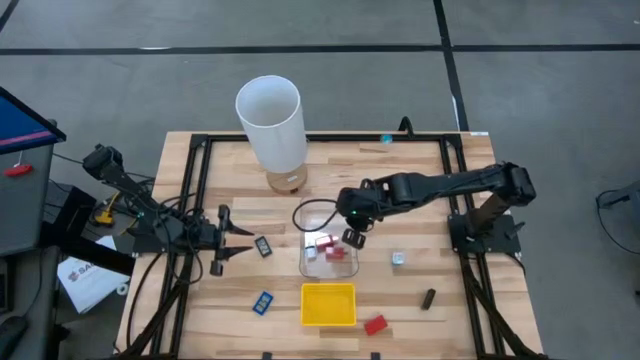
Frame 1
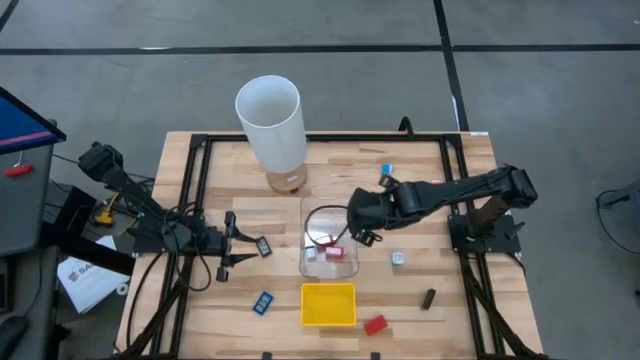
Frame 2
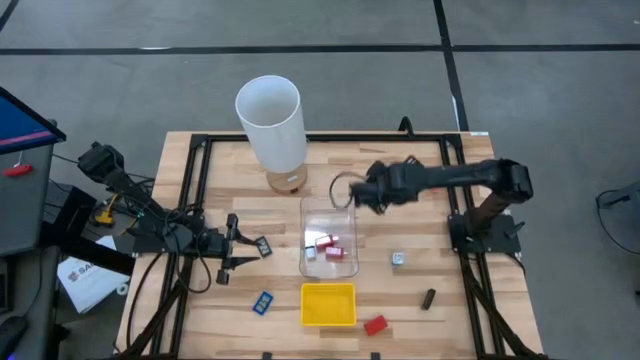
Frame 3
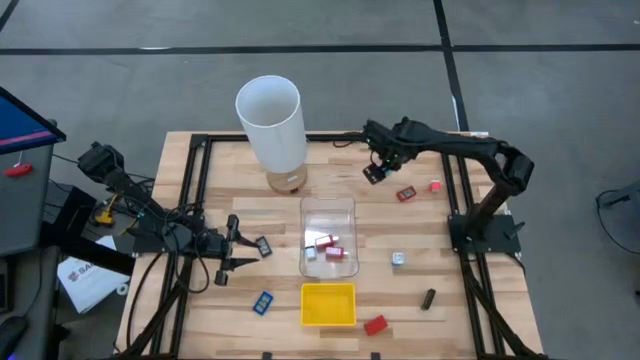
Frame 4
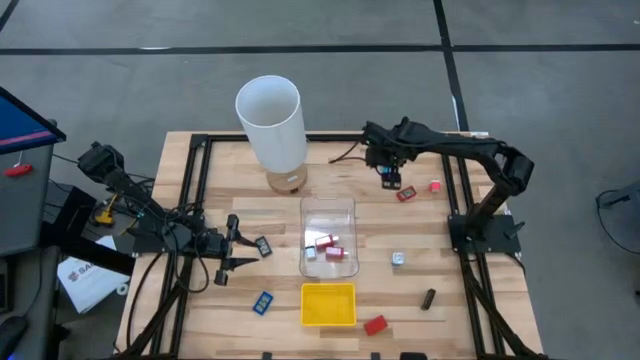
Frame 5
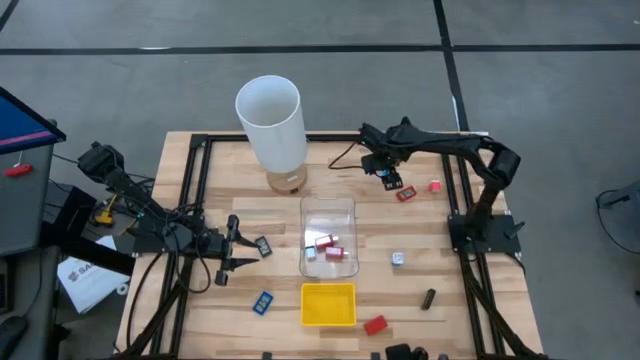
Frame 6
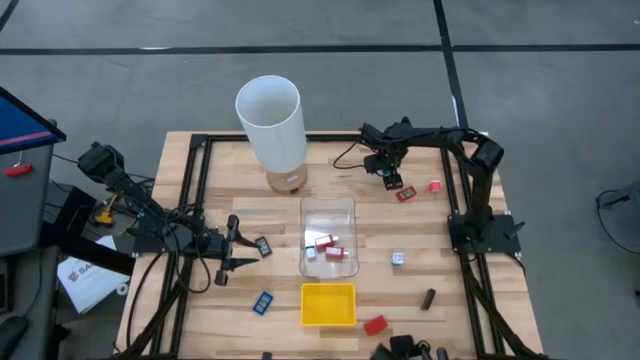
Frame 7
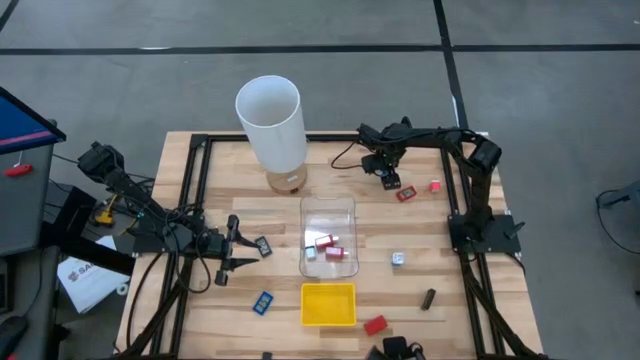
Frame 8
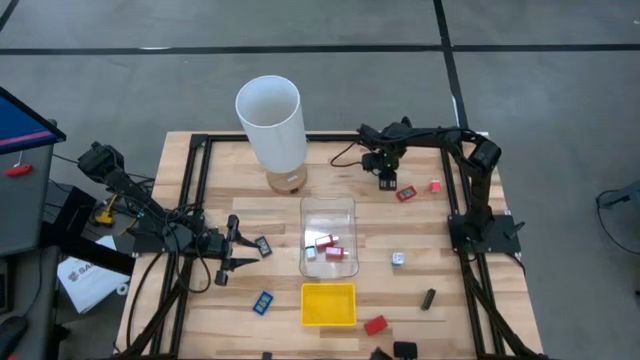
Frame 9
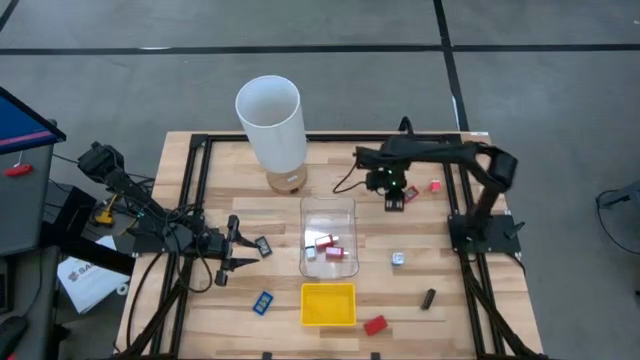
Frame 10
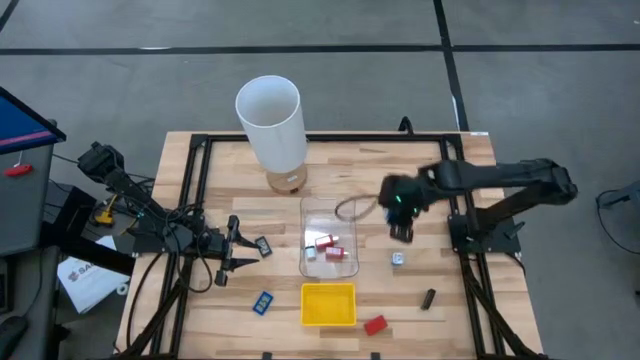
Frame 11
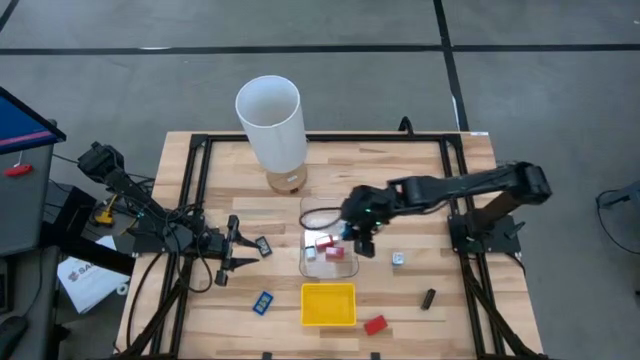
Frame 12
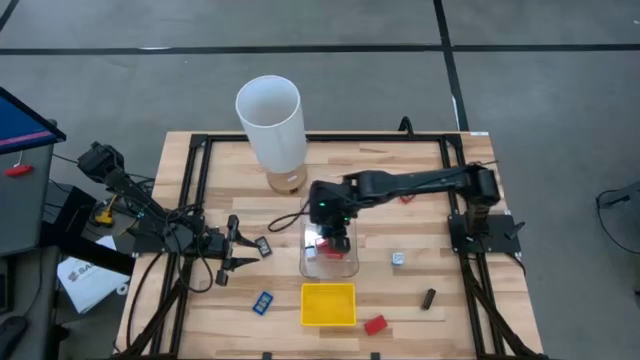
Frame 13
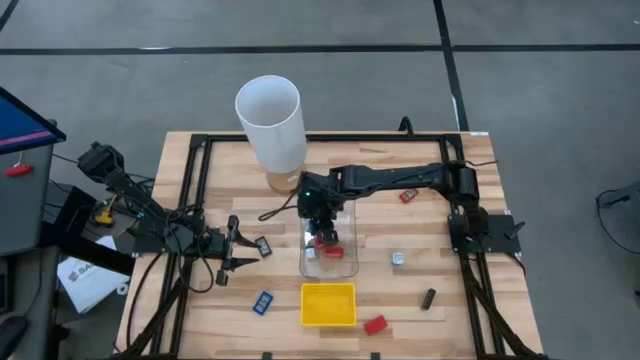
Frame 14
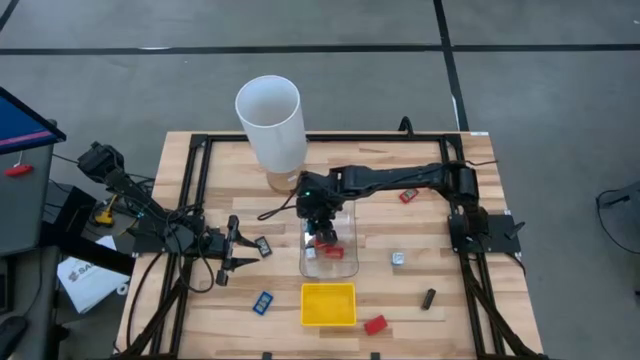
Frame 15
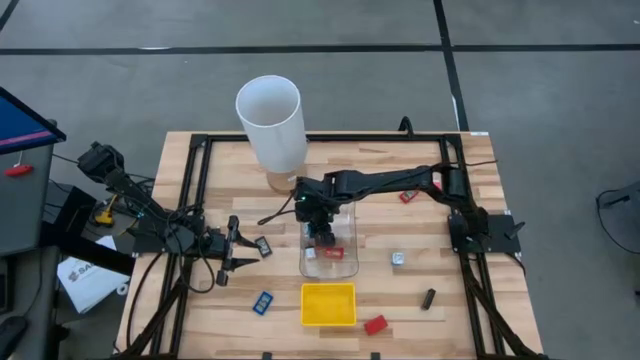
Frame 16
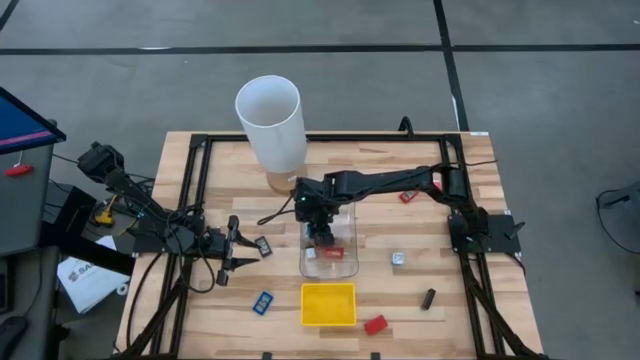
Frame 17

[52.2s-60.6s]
Task: Pick & Place Office items
Put the top blue charger adapter into the transparent bin

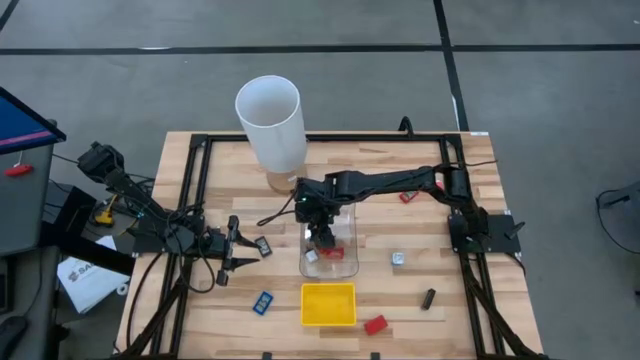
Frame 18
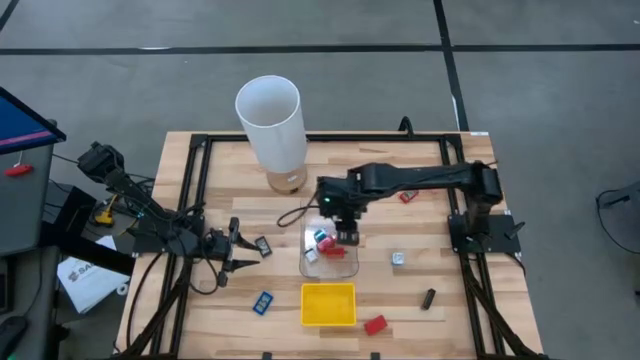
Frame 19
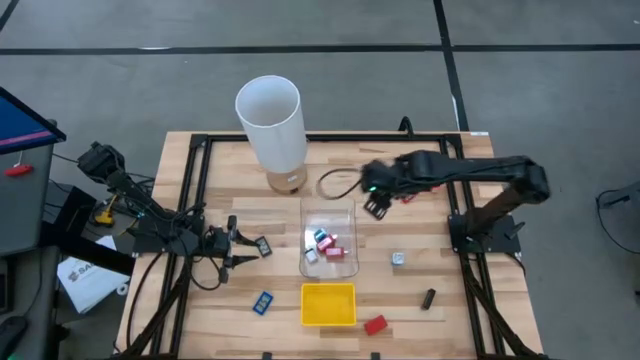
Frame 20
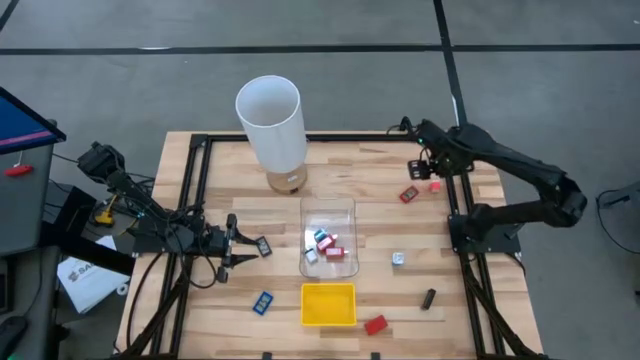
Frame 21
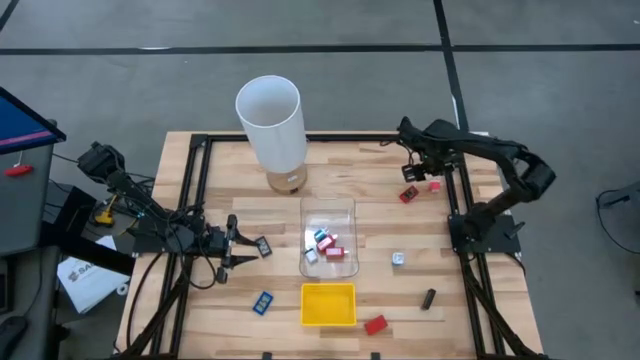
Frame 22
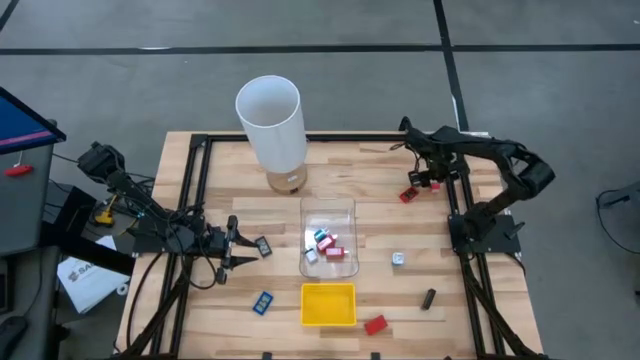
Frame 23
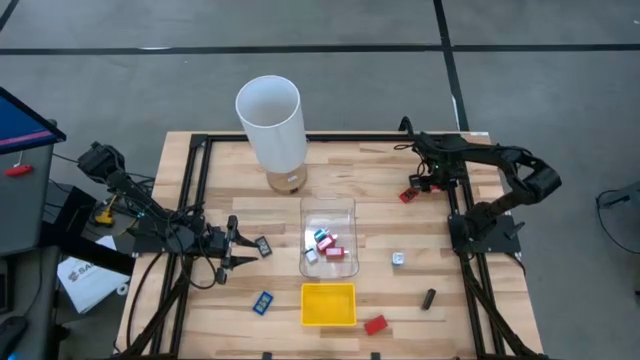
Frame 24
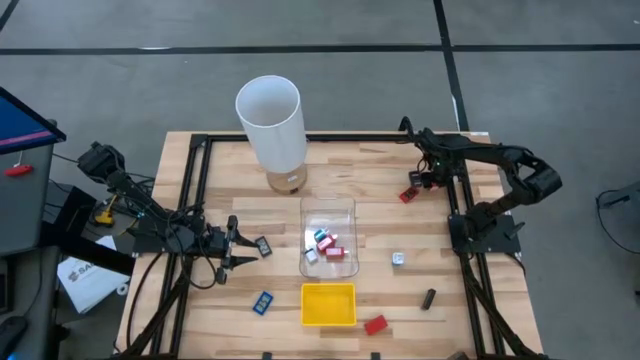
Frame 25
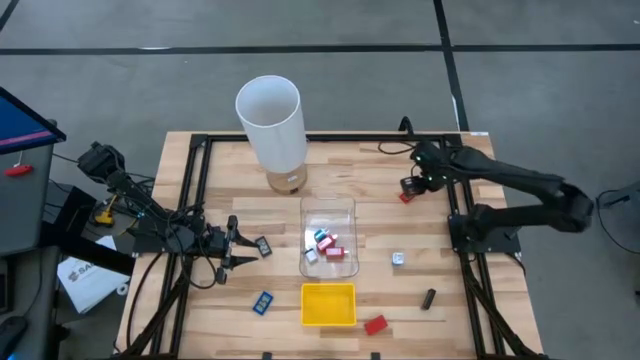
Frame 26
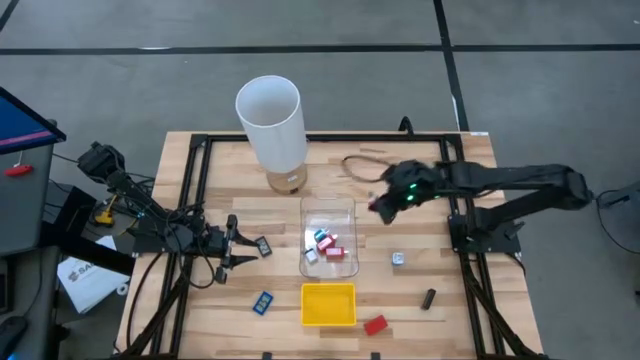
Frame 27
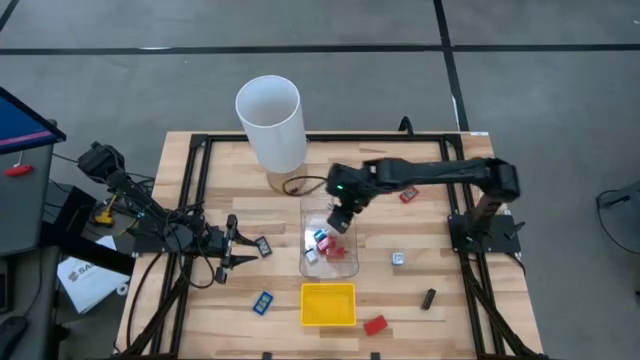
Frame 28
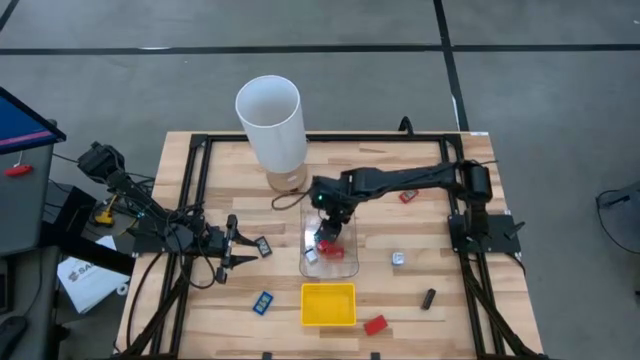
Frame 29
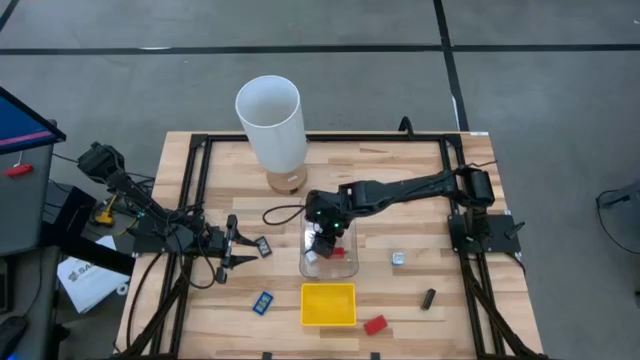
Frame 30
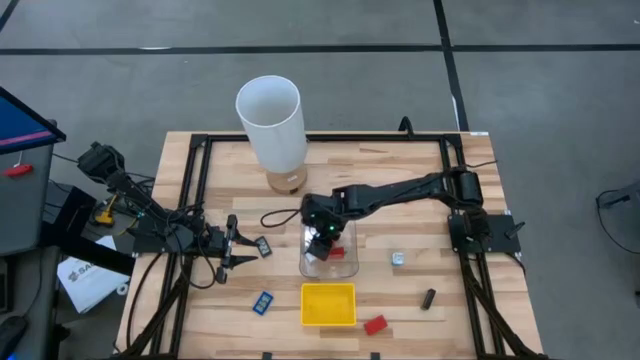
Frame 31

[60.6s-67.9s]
Put the pink charger adapter into the transparent bin

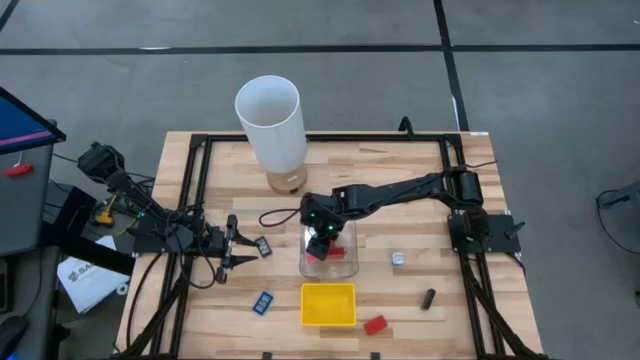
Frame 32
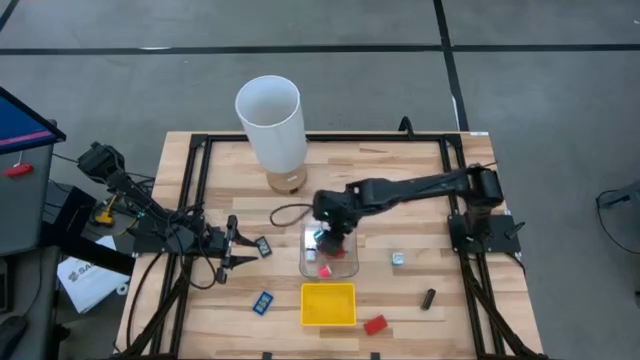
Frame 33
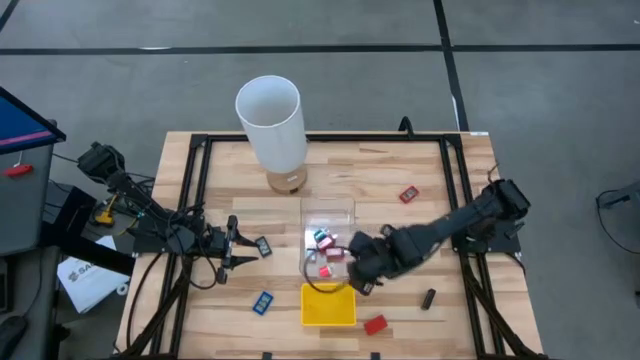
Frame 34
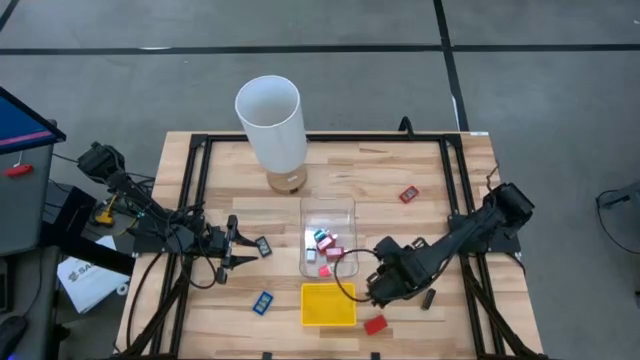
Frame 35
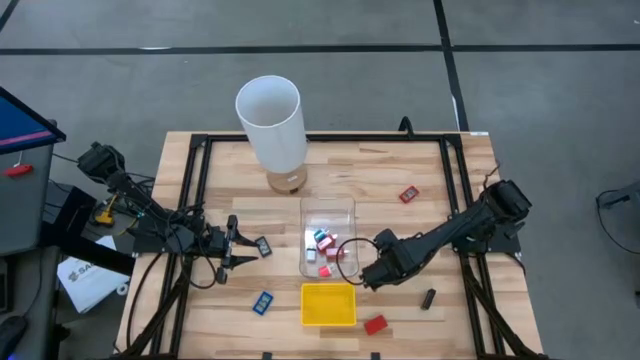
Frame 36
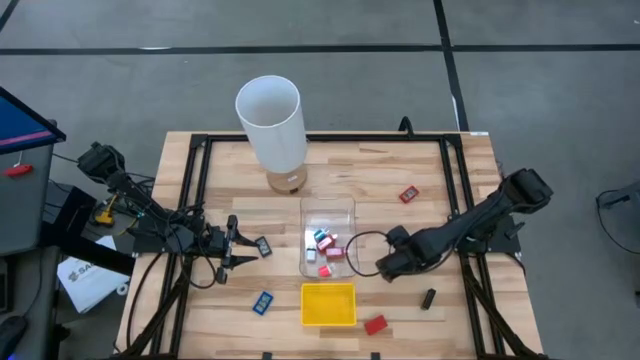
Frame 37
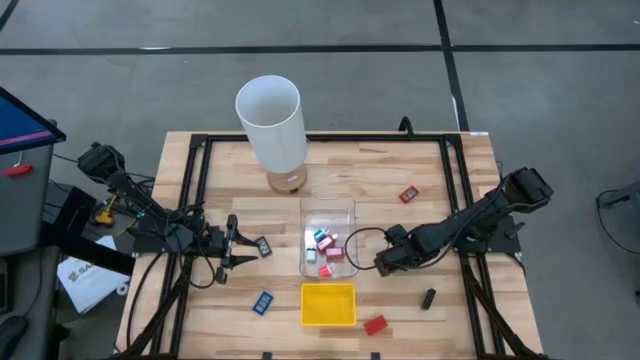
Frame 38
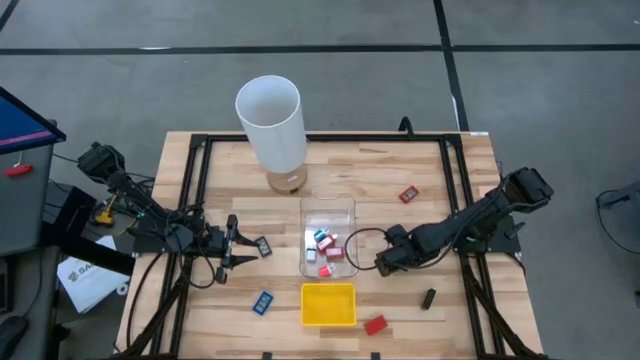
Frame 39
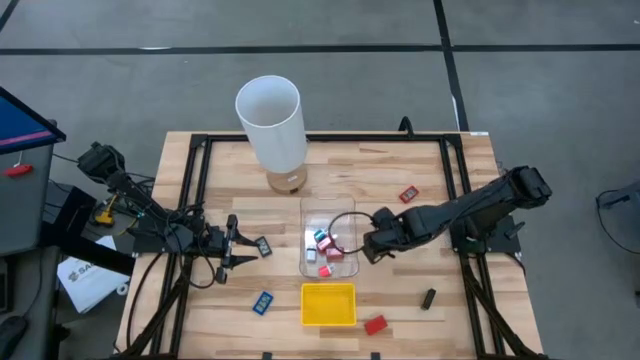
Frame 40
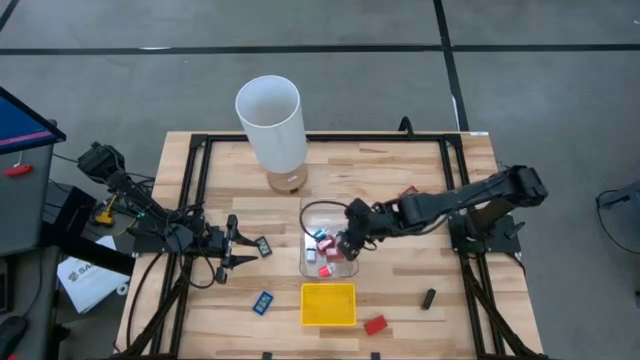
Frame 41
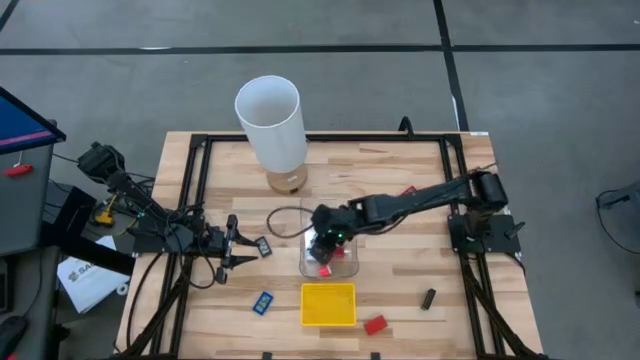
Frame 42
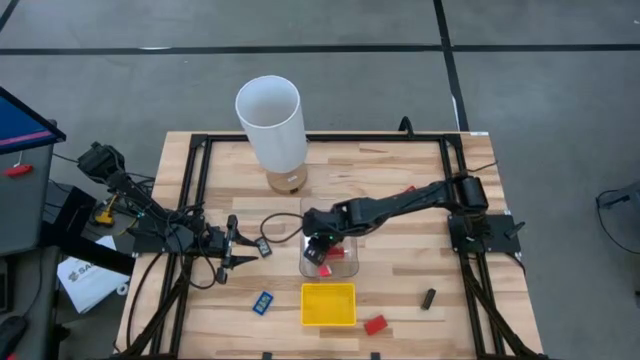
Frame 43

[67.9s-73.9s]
Put the blue charger adapter into the transparent bin
